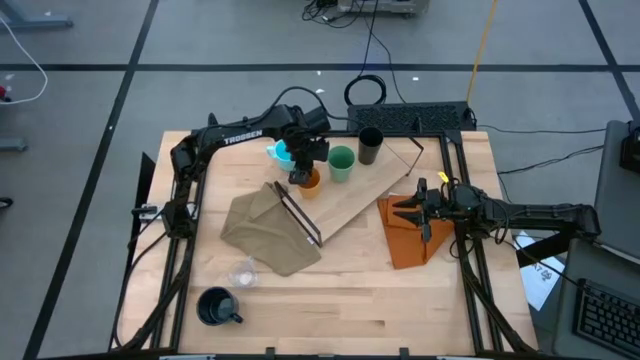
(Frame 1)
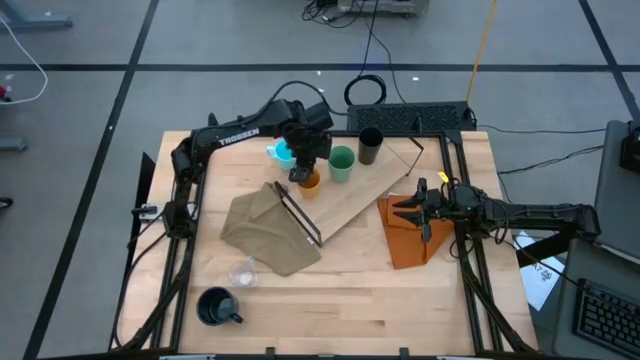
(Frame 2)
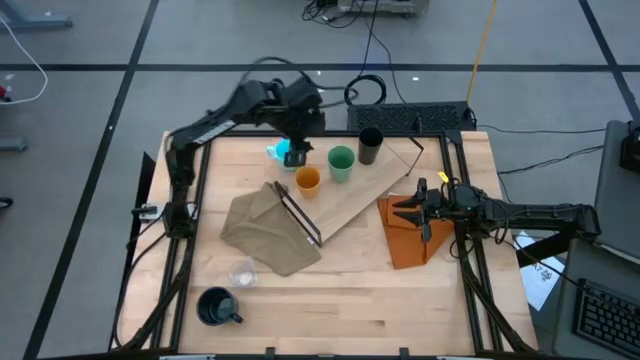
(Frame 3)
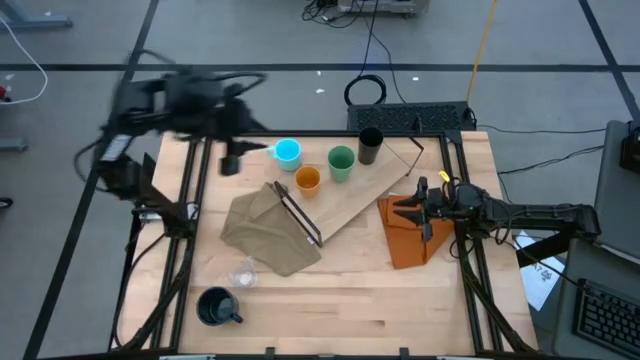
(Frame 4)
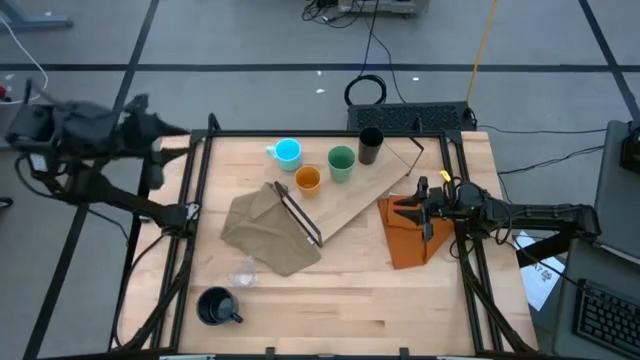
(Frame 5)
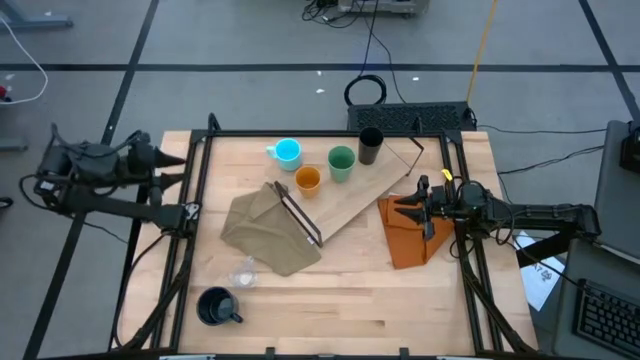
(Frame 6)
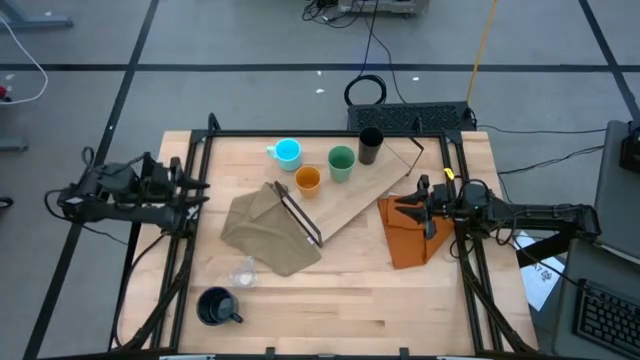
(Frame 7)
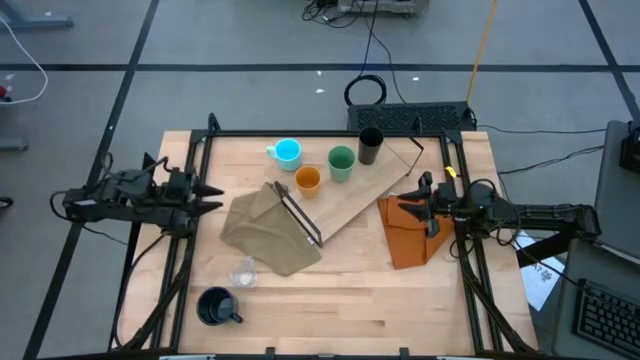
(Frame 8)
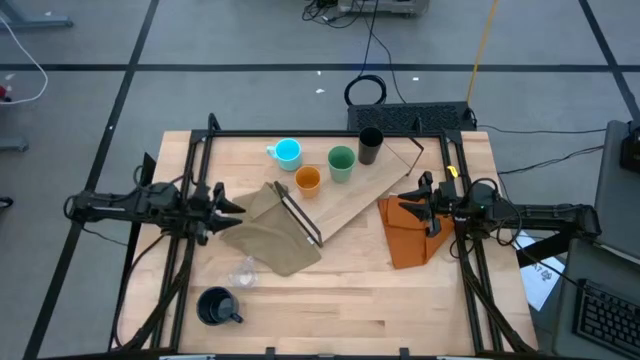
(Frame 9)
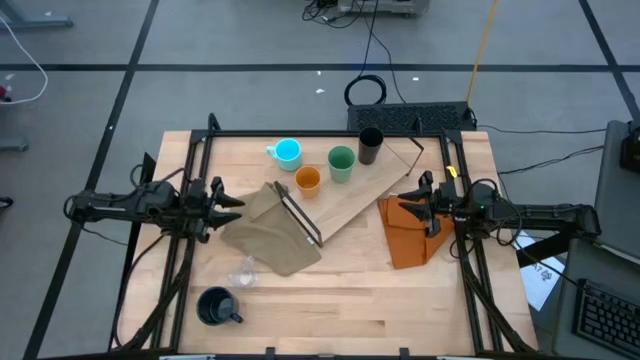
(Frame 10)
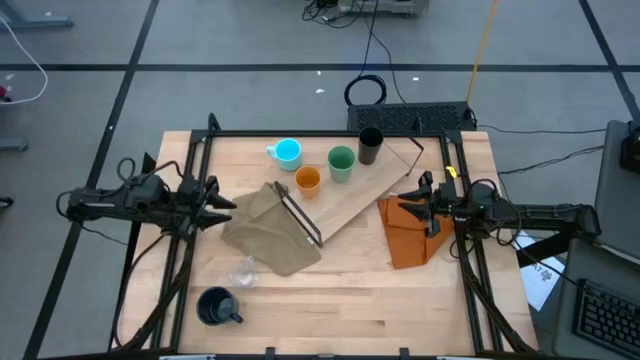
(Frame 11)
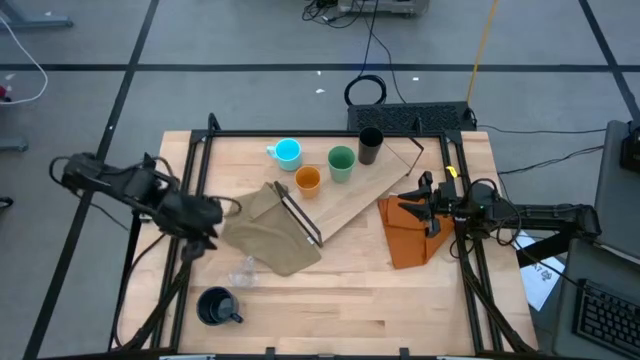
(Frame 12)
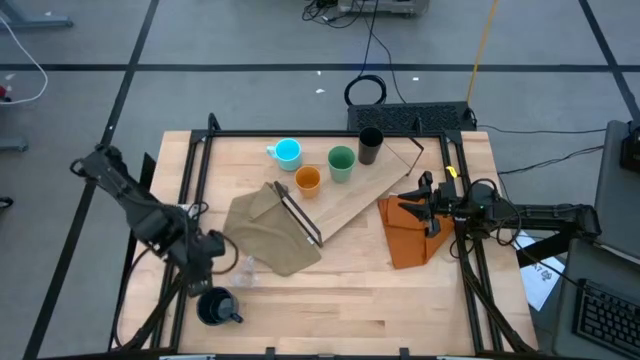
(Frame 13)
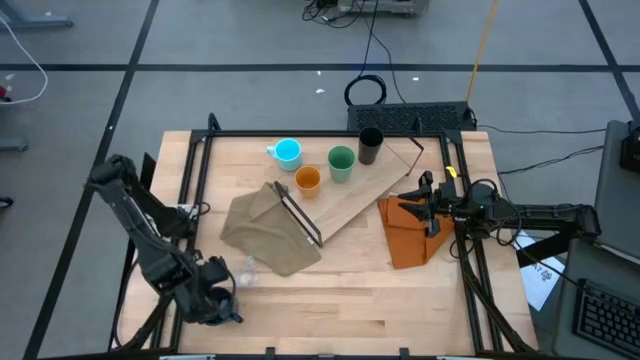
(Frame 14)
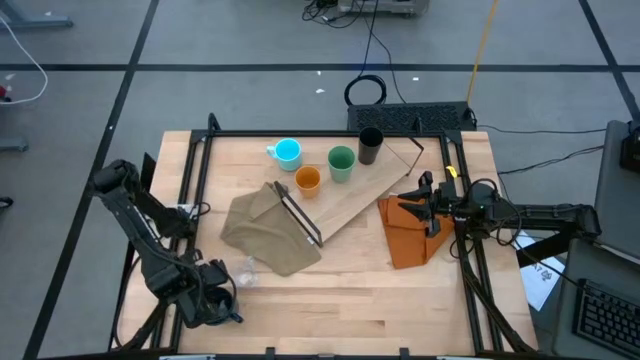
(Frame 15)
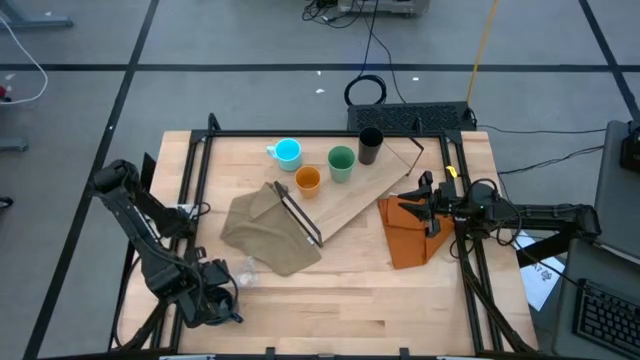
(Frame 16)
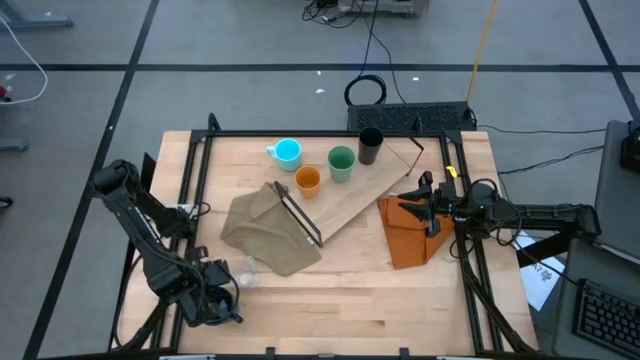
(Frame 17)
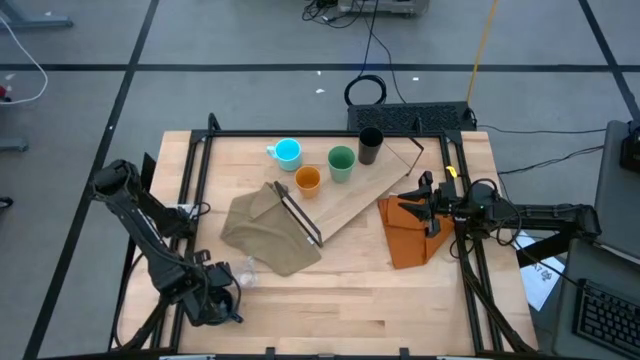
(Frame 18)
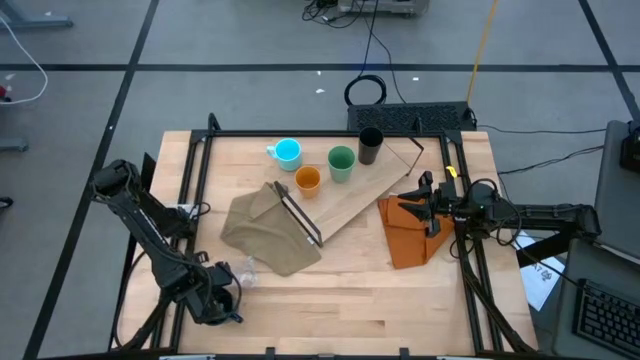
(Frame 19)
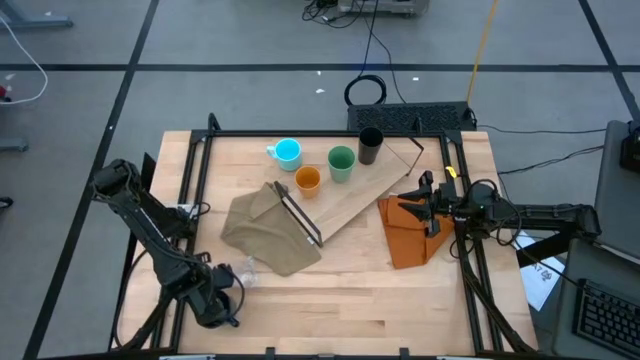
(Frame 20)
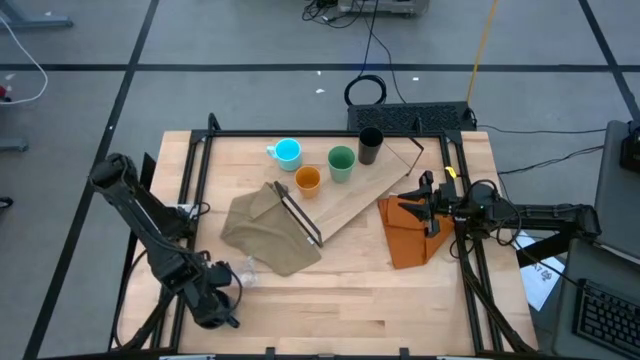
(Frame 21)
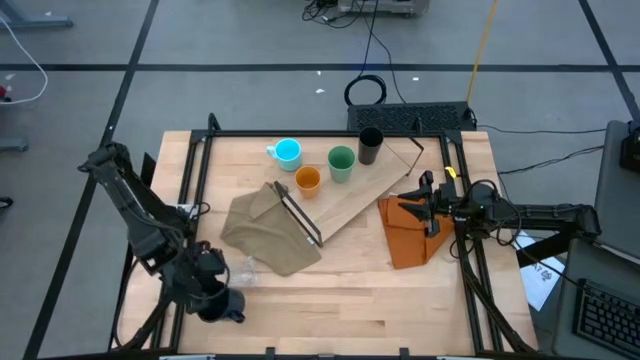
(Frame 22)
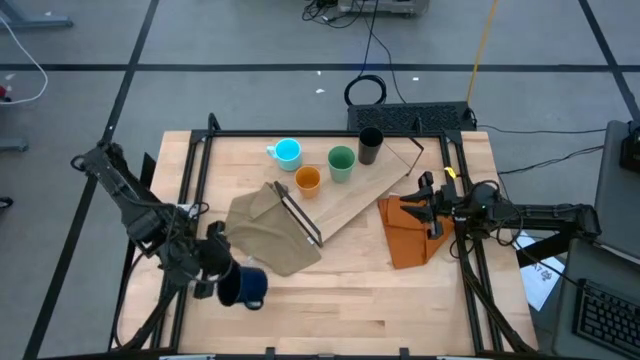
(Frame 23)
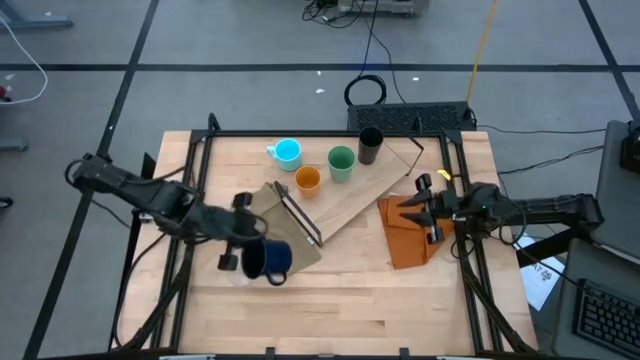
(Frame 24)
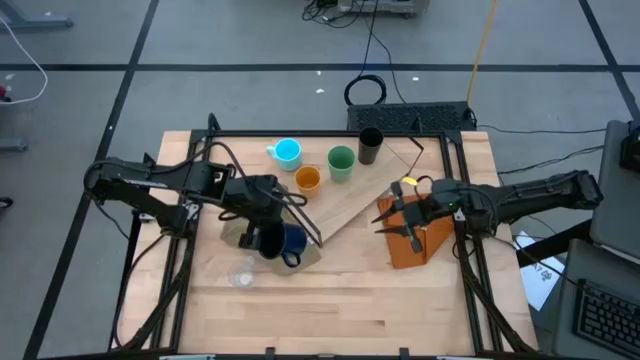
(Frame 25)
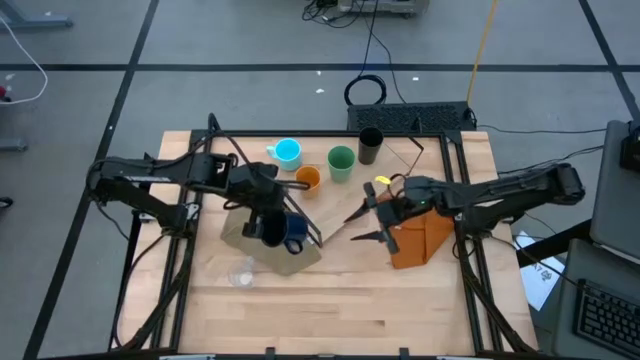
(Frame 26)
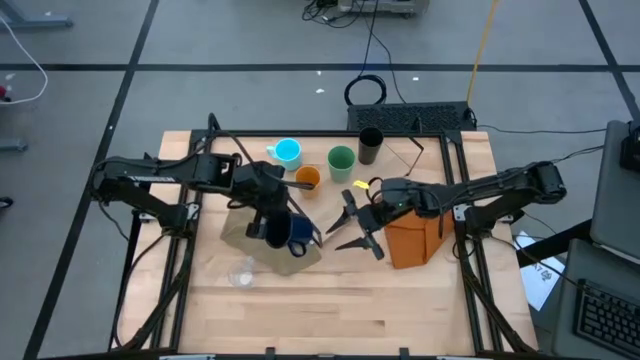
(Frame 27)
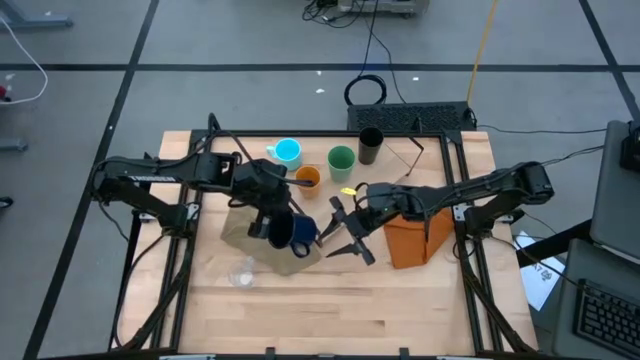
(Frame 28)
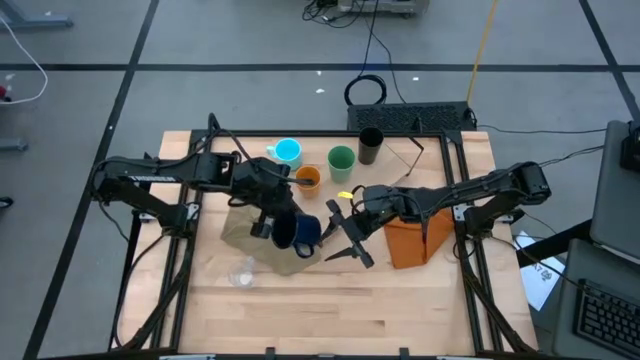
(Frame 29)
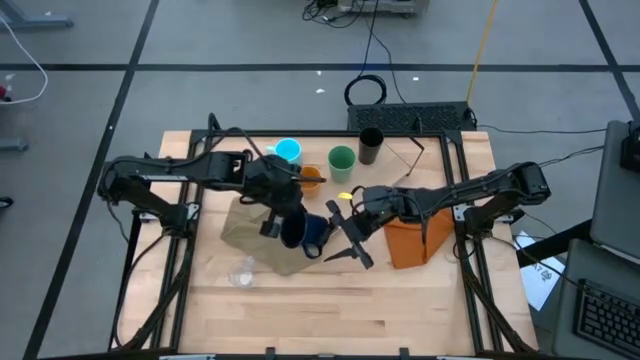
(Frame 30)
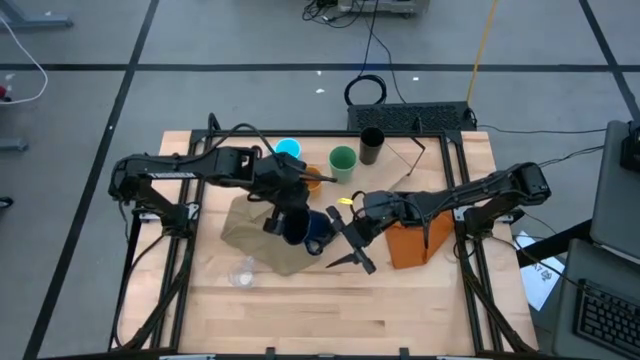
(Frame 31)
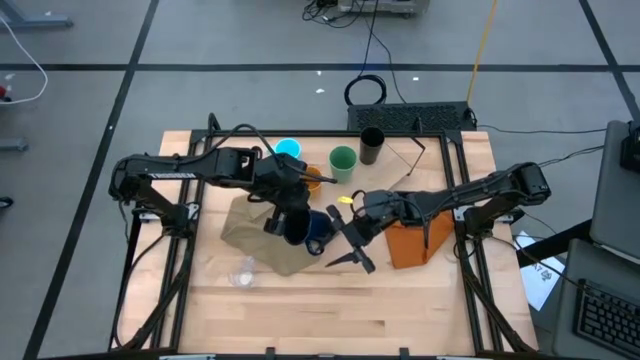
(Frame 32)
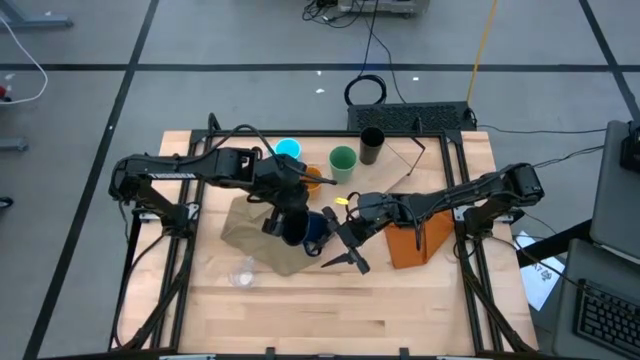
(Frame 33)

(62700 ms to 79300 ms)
Task: Stack small to large cups/mugs on shelf
Put the dark blue mug on the shelf
